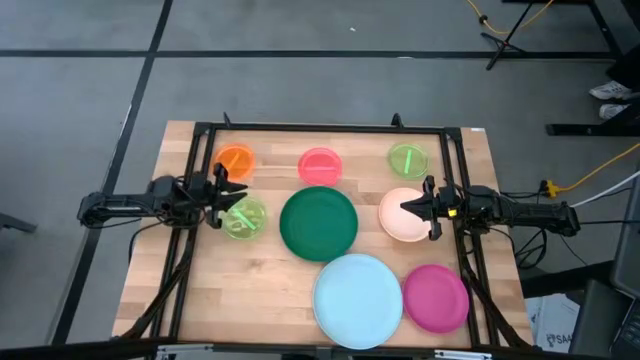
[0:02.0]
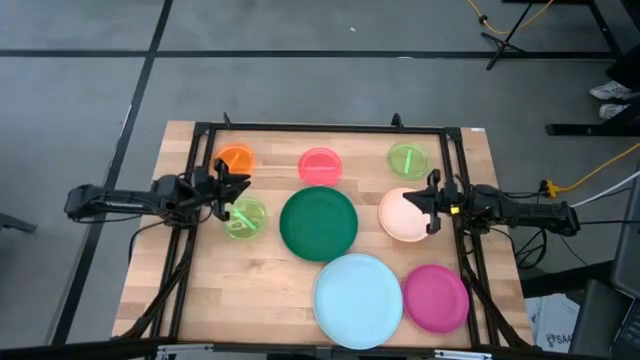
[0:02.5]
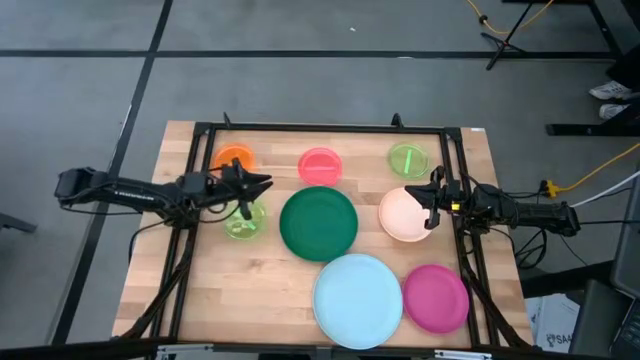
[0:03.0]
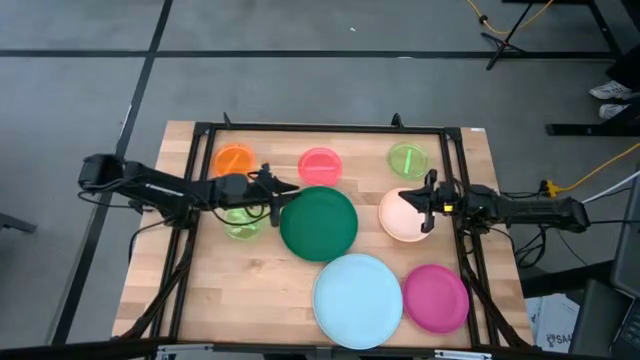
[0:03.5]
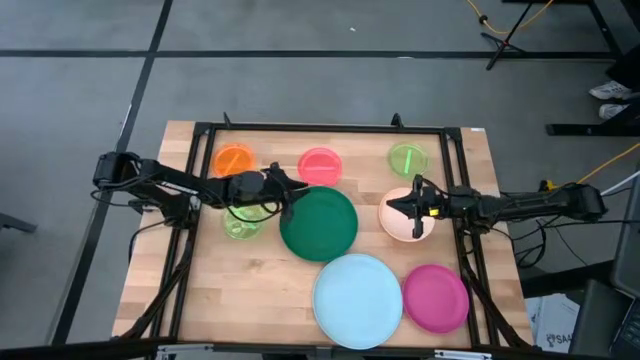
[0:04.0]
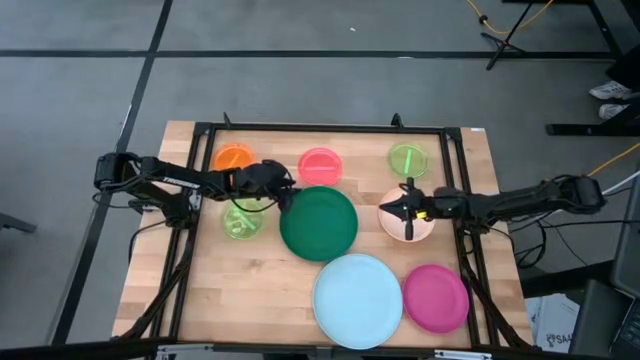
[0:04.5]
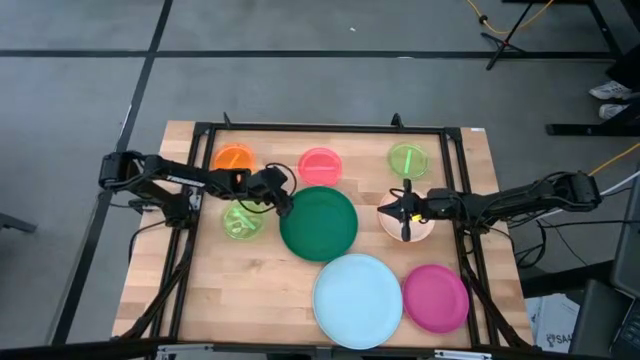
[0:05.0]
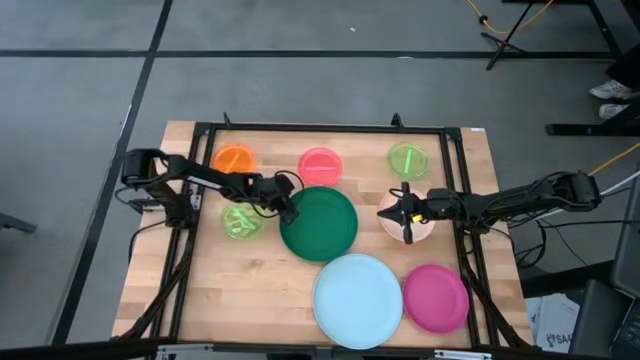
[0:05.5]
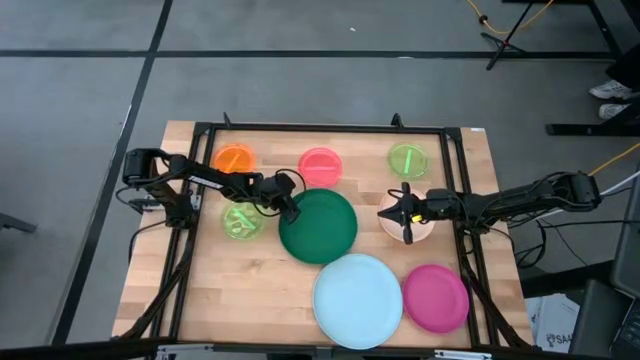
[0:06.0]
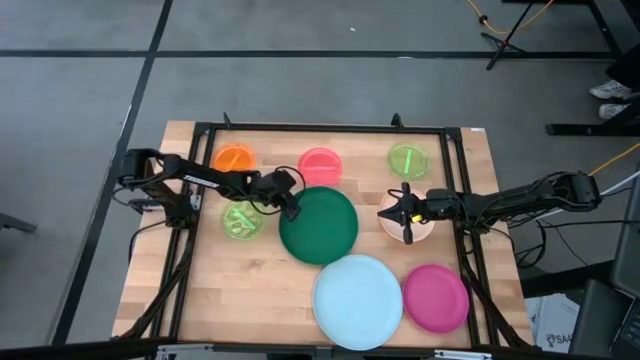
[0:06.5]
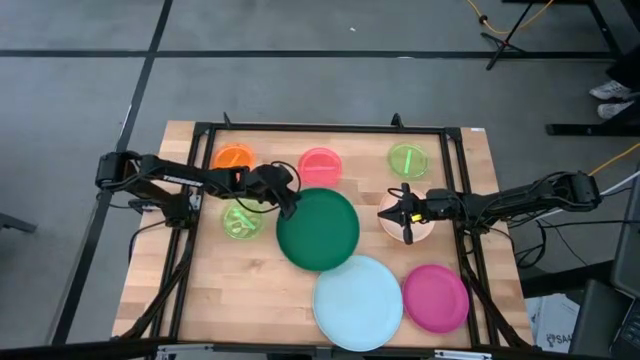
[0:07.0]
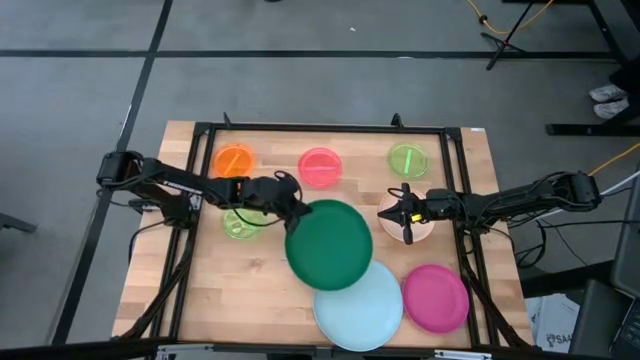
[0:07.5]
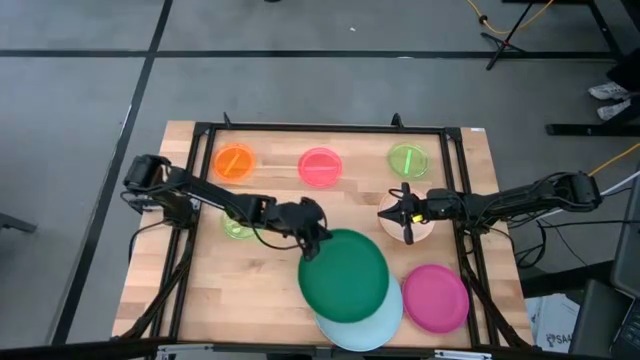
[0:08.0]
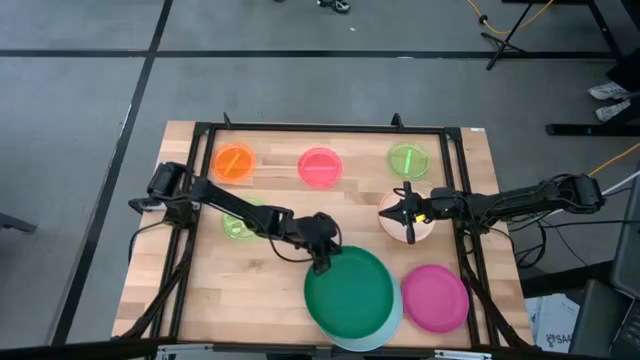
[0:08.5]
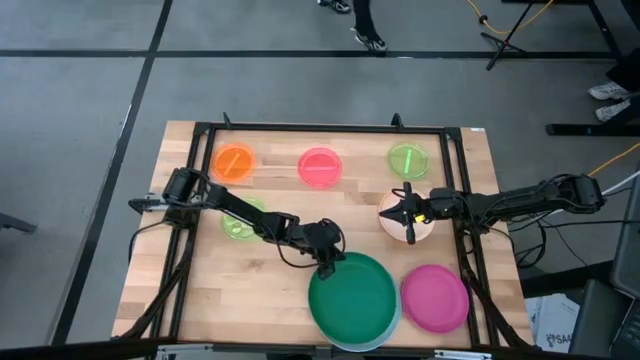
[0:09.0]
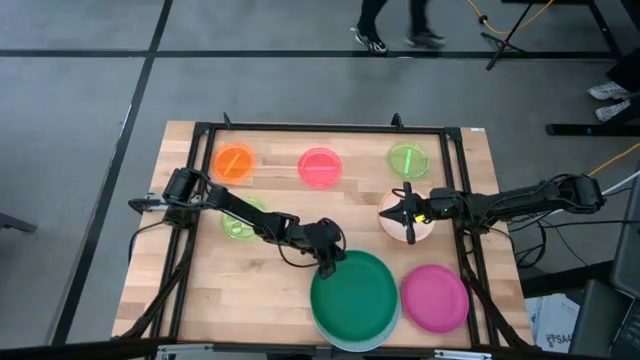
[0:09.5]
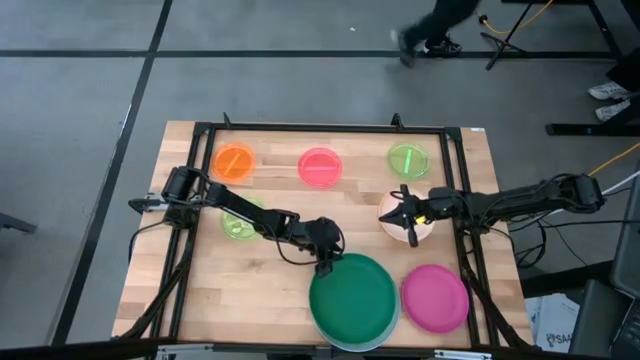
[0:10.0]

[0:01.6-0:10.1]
Task: Stack plastic plates
Stack the green plate on top of the light blue plate

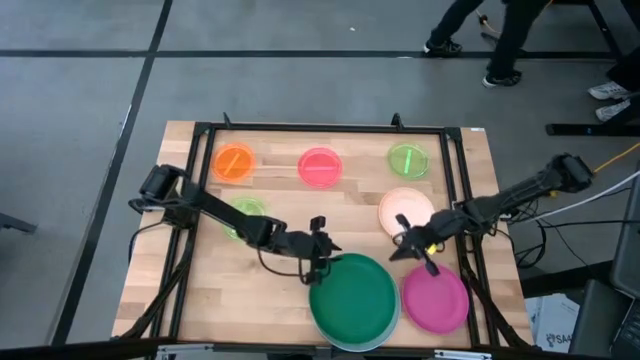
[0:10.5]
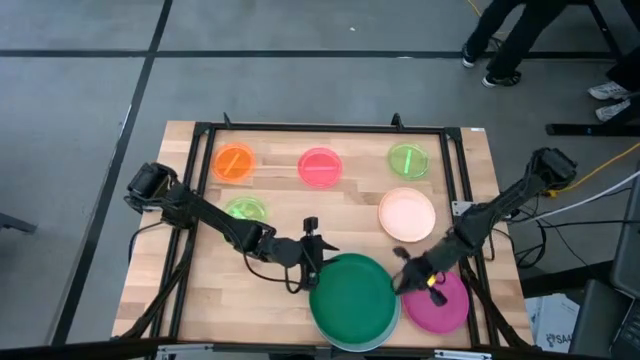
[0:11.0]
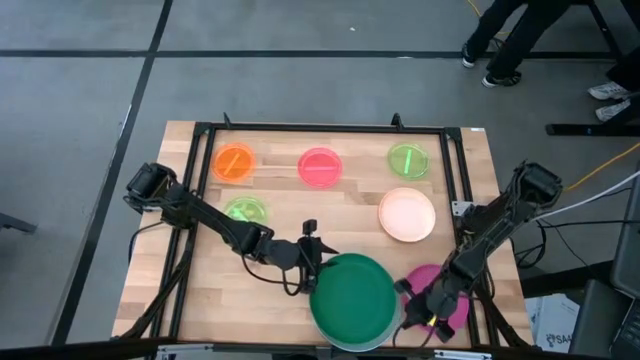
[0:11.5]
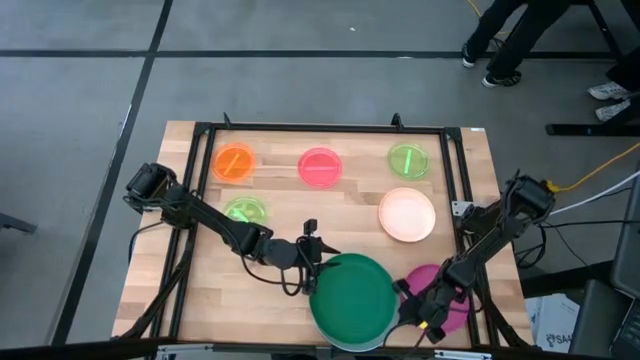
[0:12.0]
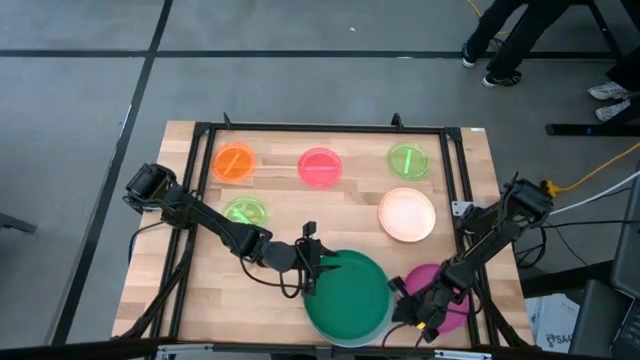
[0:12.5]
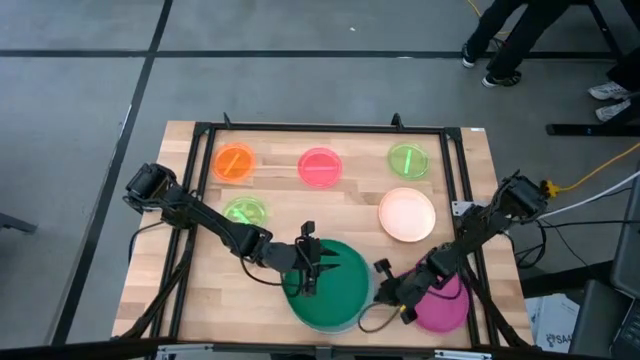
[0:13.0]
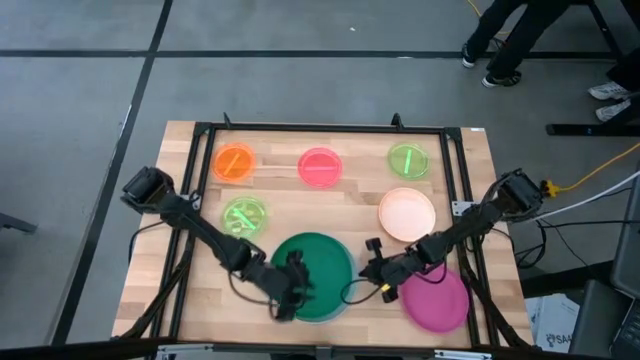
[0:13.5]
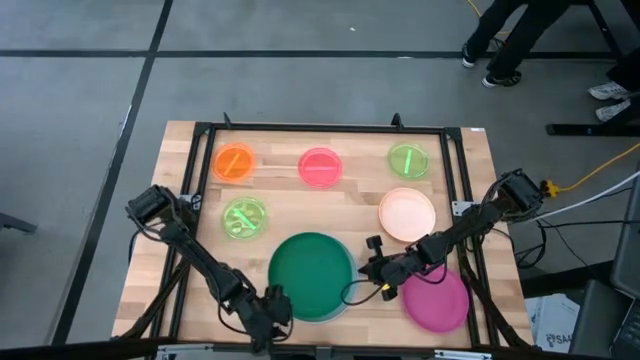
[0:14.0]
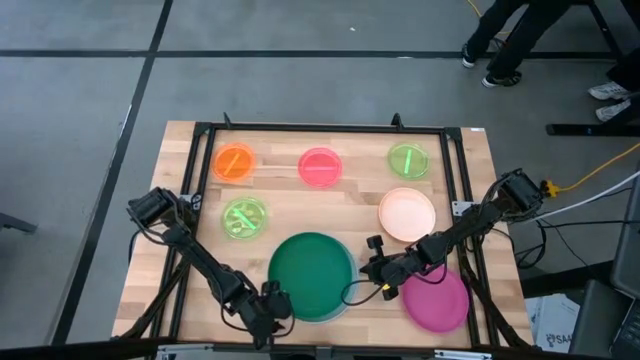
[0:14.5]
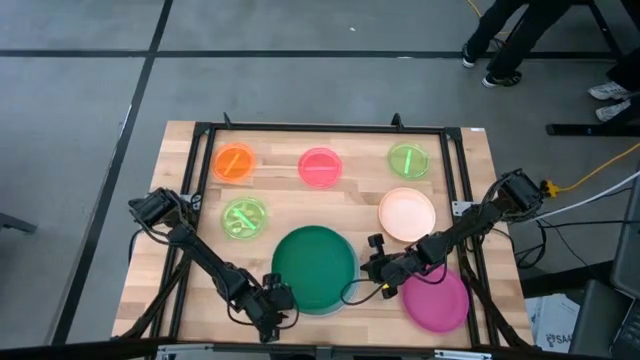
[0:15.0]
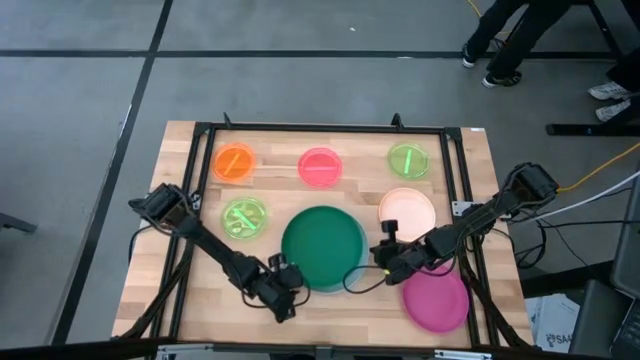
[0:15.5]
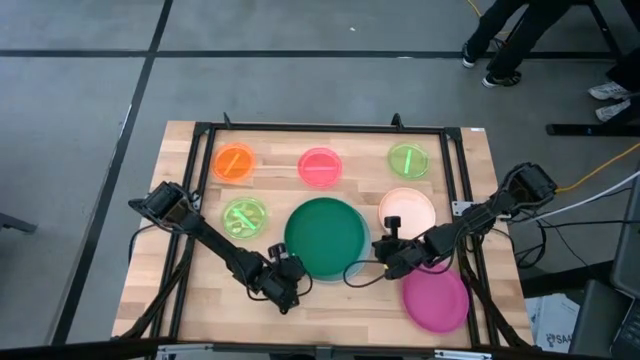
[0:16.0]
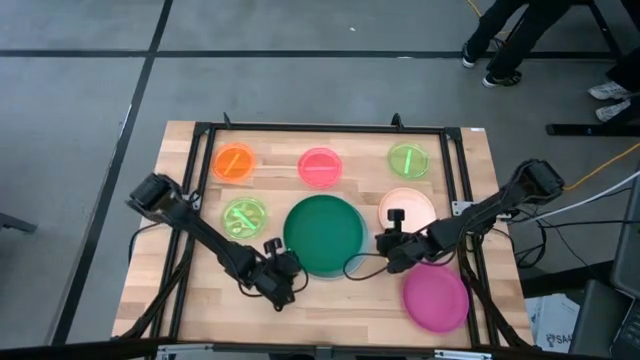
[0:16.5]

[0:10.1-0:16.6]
Move the stack of plates to the center of the table

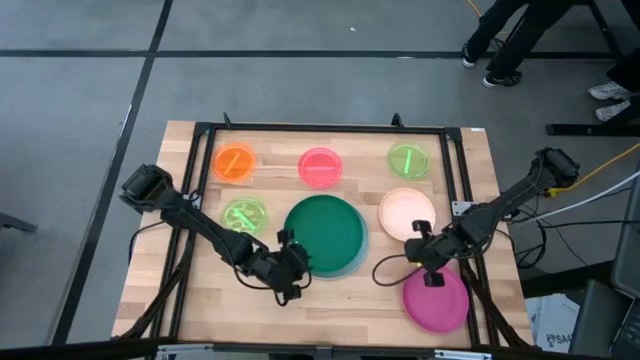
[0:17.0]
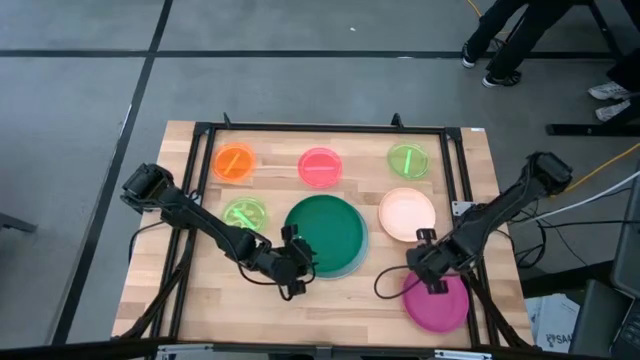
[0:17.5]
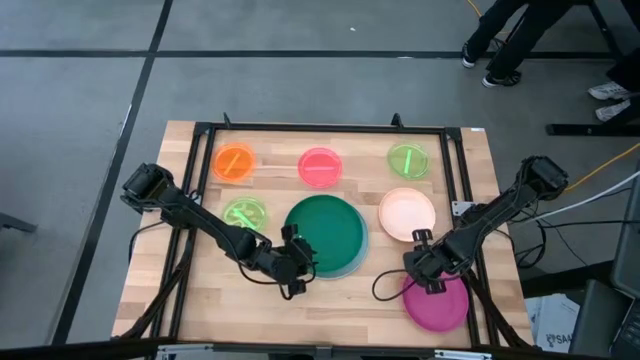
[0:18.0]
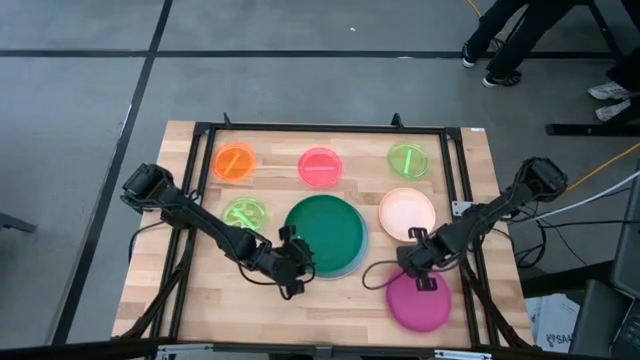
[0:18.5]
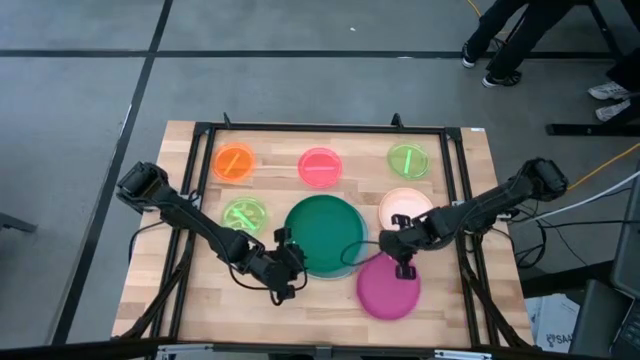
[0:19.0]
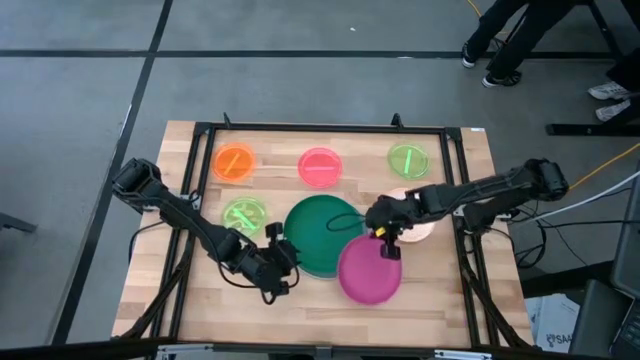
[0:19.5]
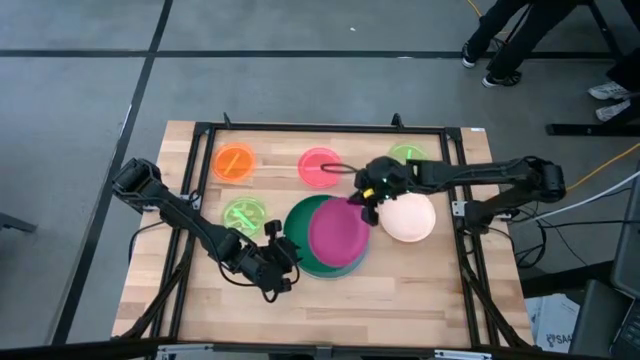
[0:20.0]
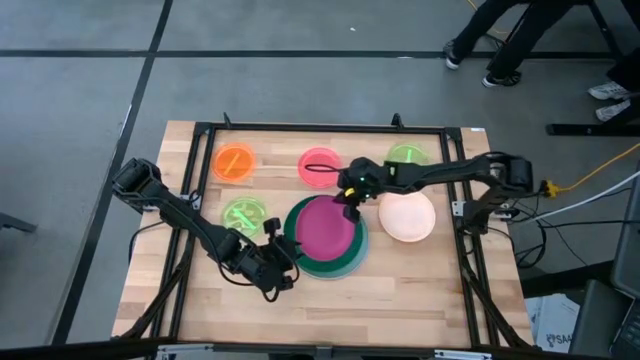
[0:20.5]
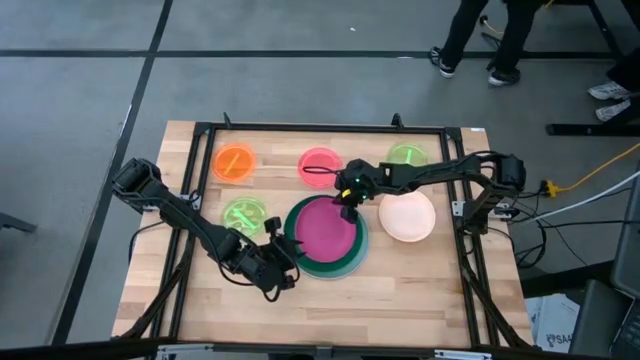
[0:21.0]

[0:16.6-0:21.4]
Stack the pink plate on top of the green plate

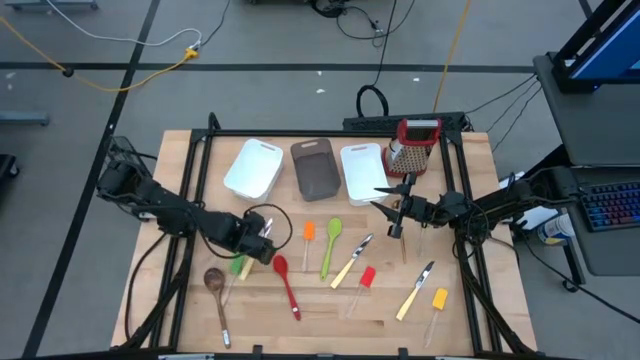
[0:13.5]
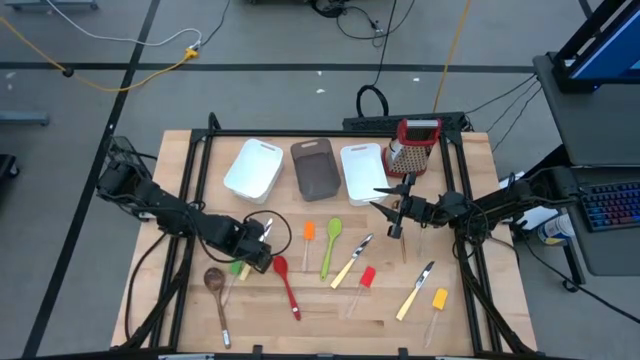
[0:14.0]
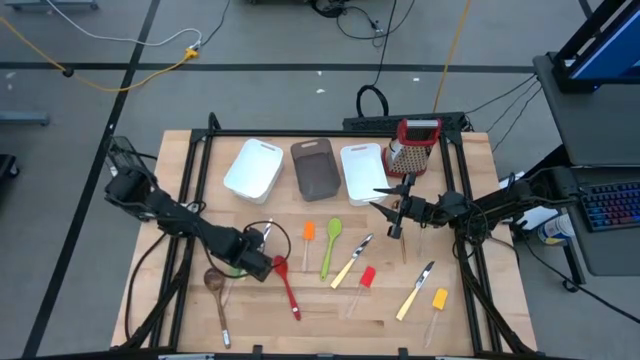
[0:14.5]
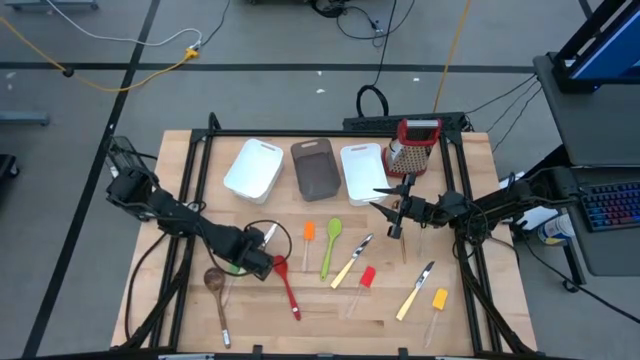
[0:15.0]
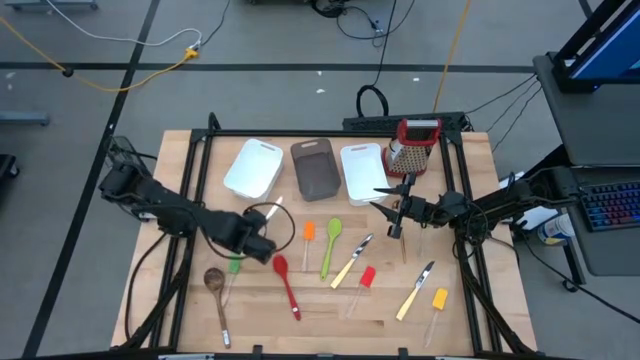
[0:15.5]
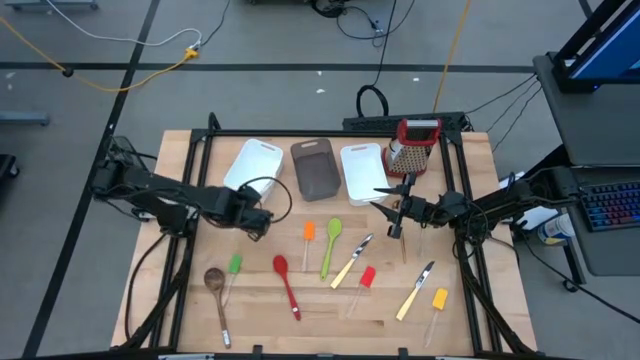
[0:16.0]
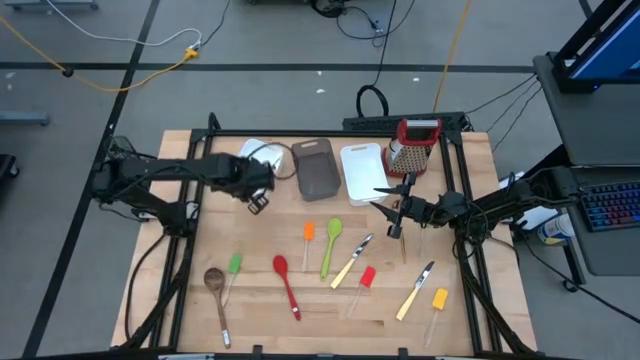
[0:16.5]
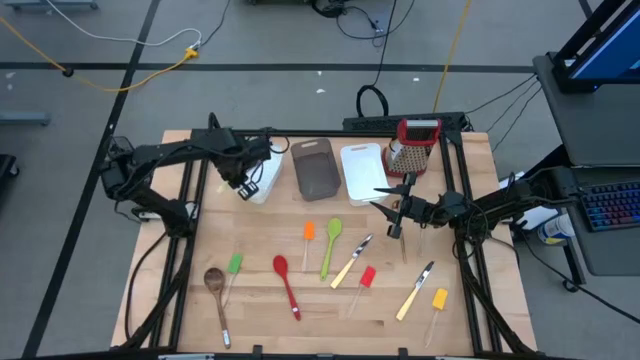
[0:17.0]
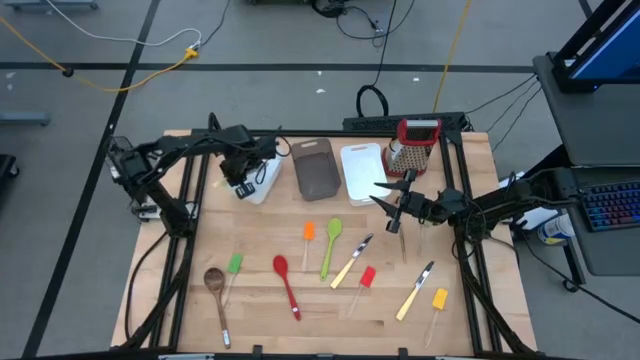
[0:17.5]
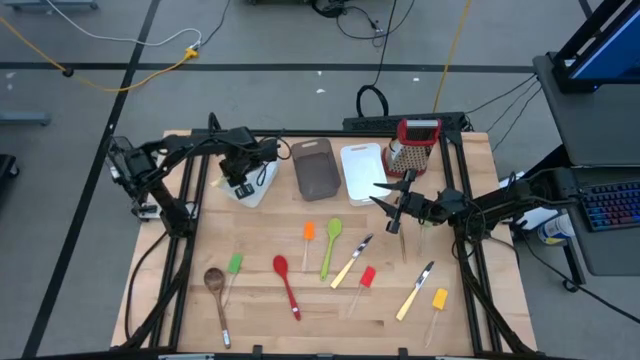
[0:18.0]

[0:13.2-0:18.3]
Task: Pick & Place Kitchen Items
Put the left yellow knife into the left white bin
